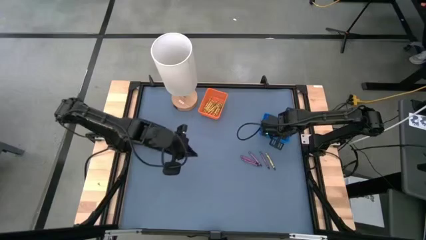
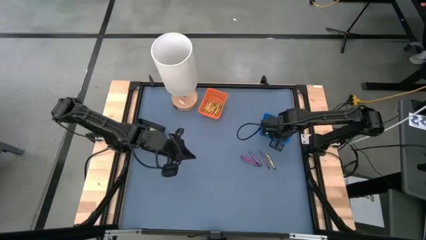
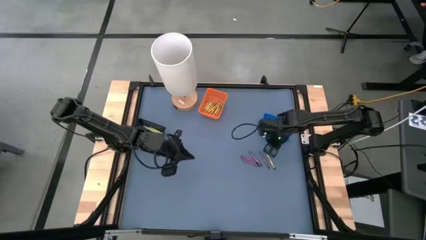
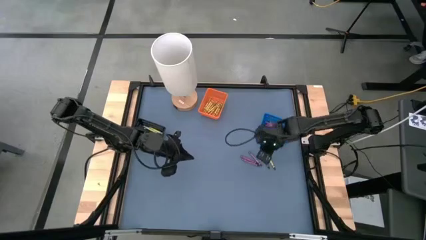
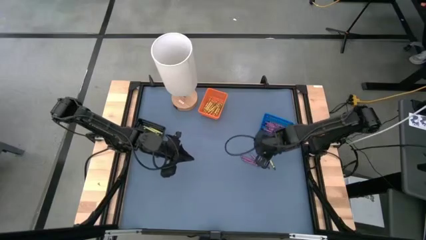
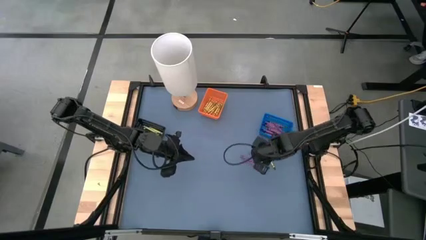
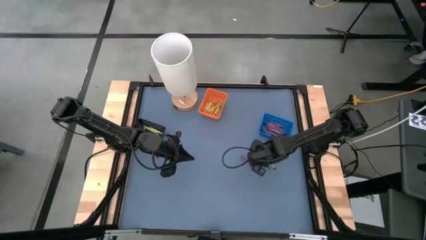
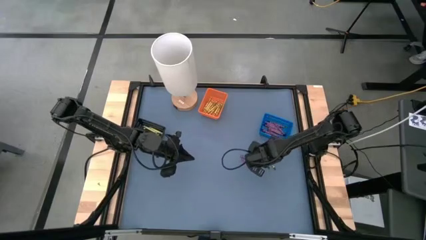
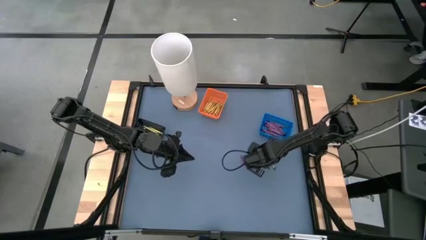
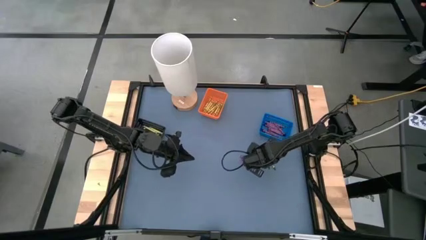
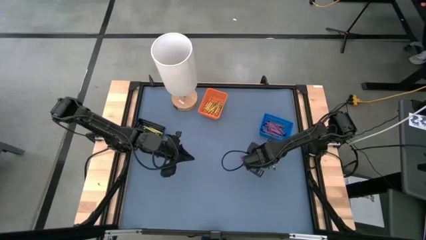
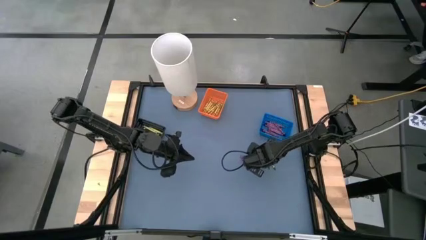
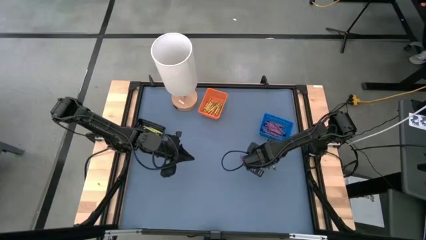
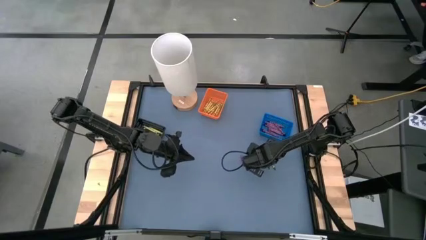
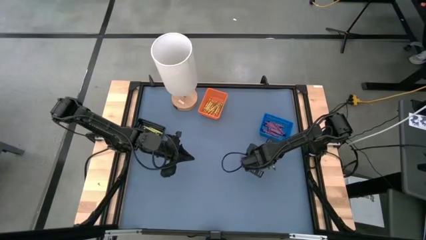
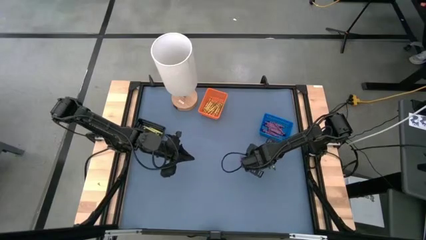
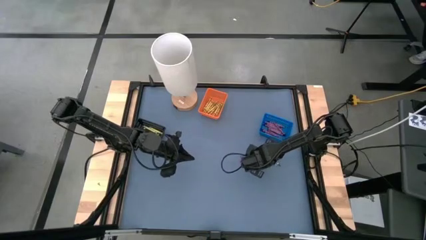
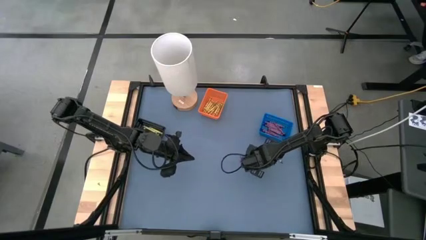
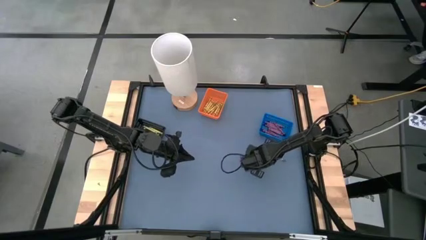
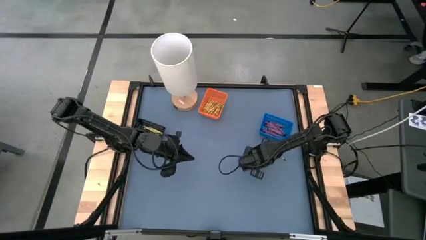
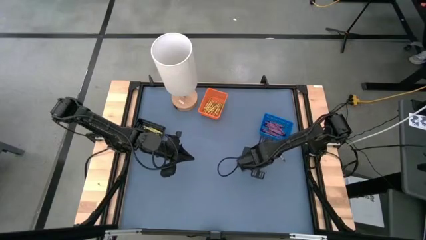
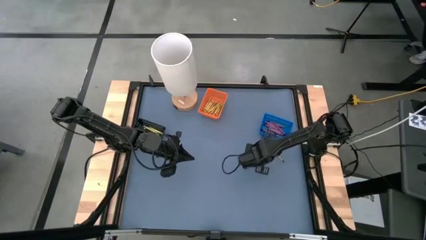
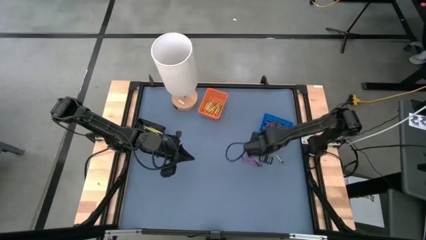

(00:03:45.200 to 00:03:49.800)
Task: Sort crayons
Put the violet crayon into the blue basket

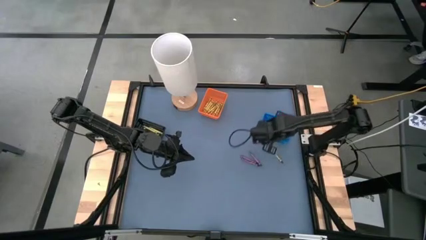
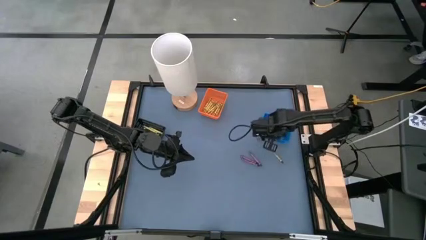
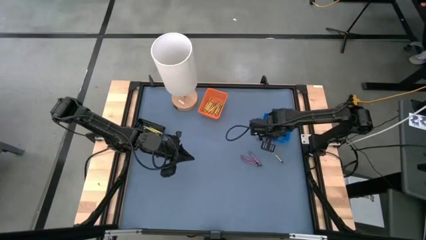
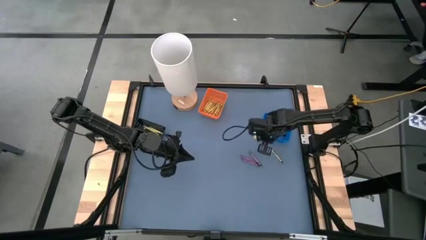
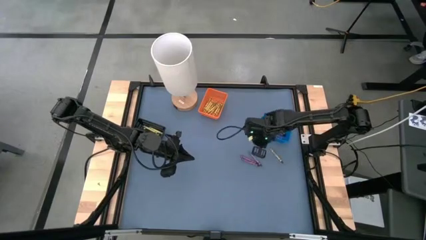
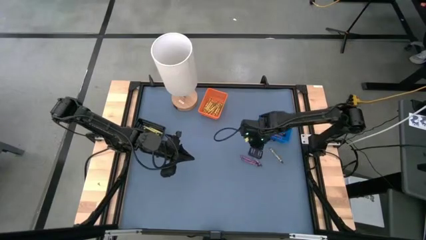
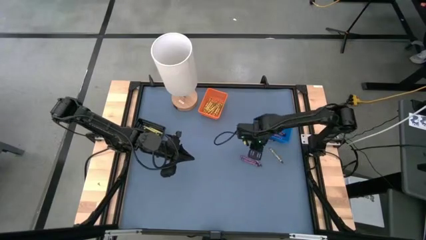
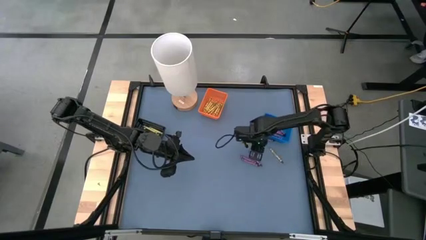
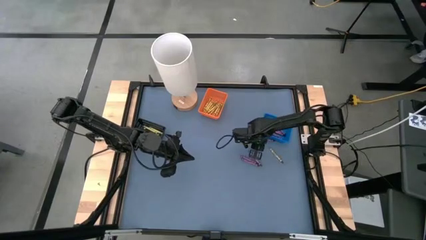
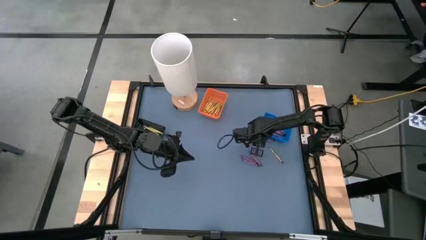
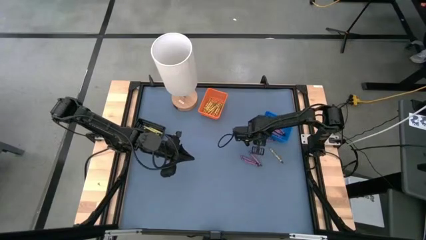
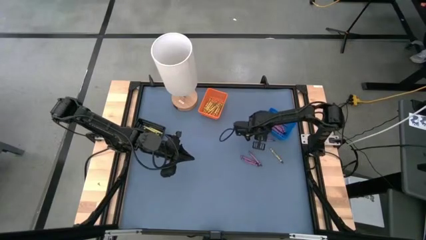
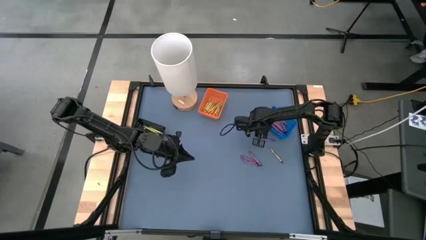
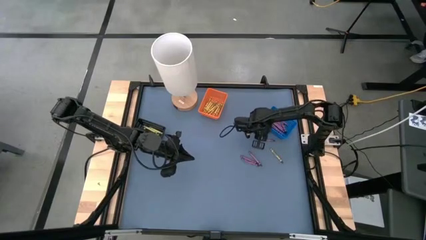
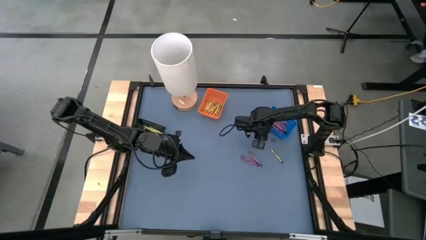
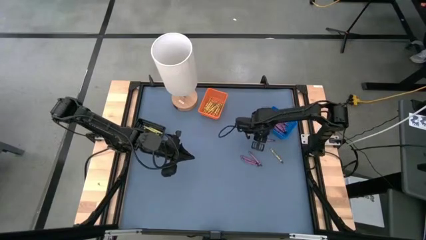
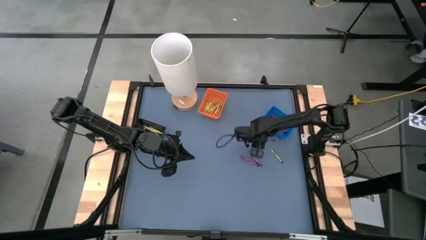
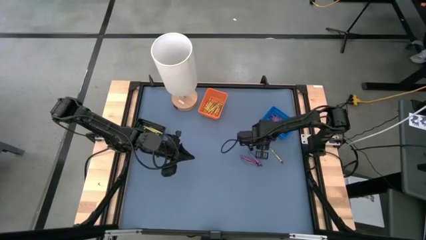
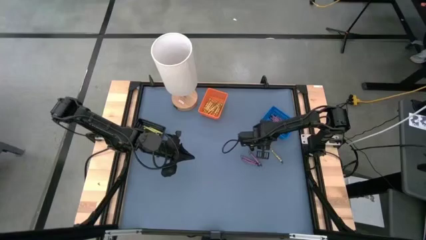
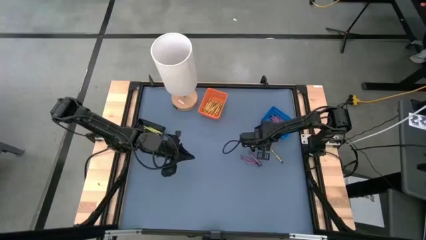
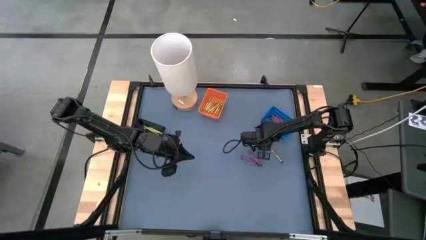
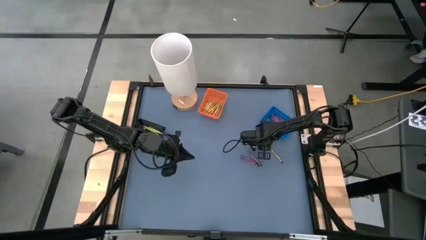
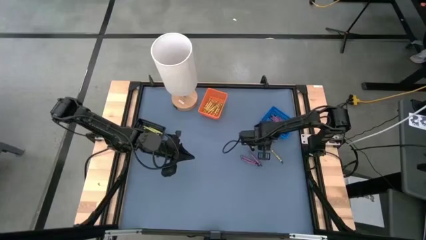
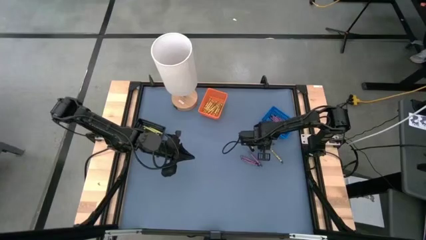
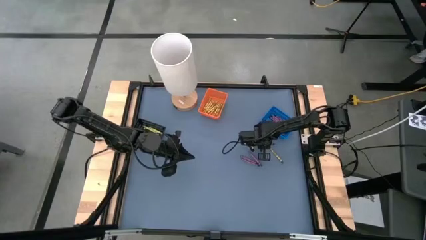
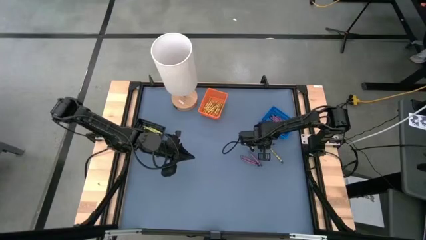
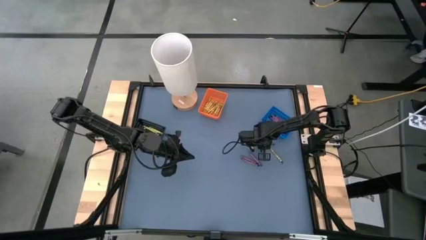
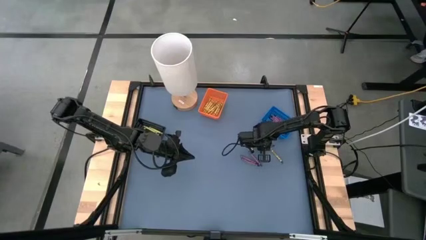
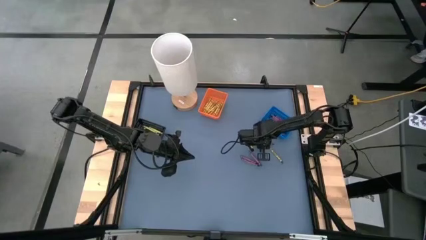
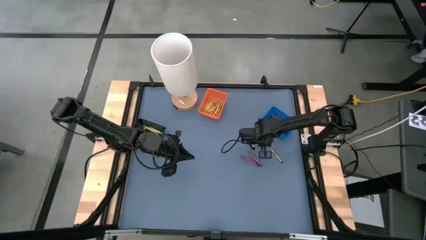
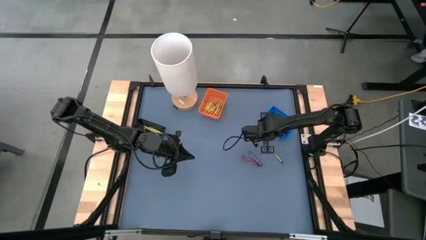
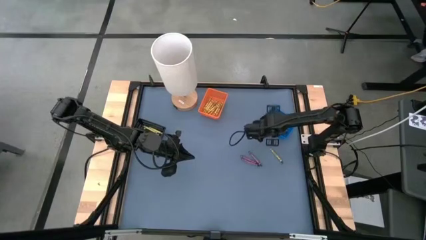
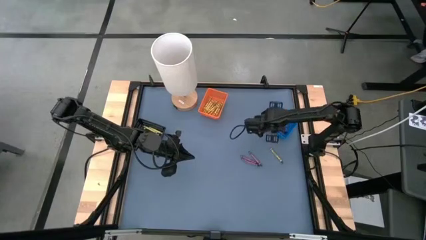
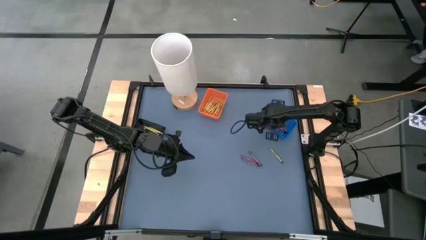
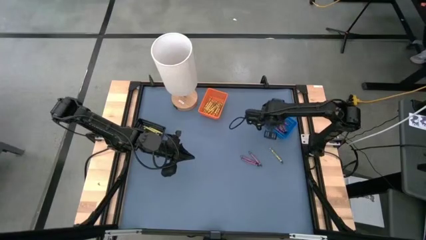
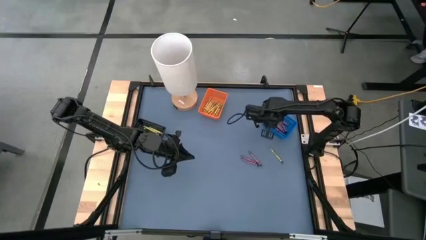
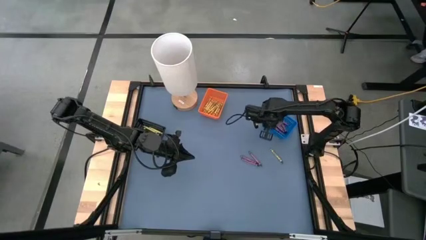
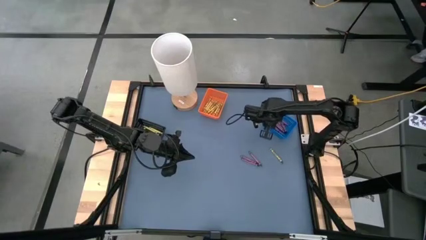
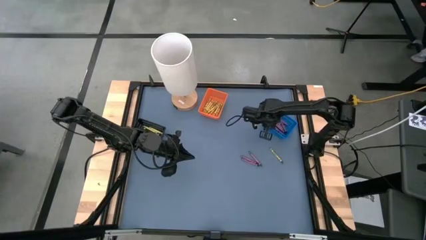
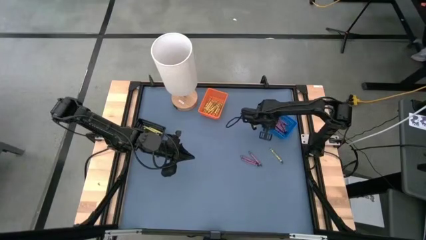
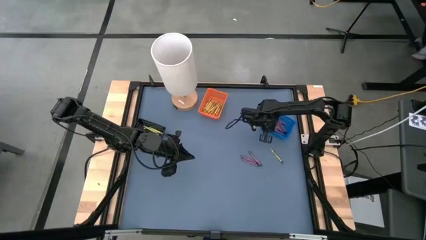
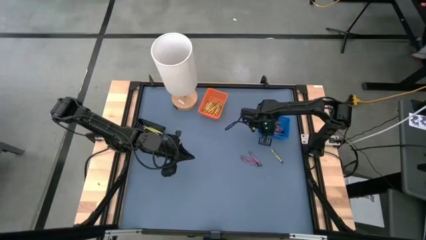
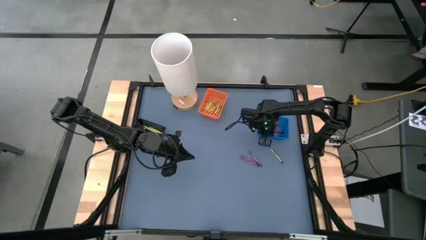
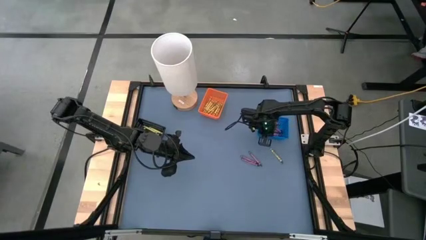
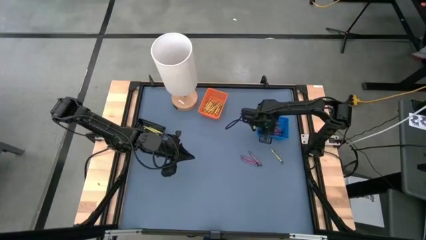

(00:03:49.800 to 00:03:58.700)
Put the violet crayon into the blue basket

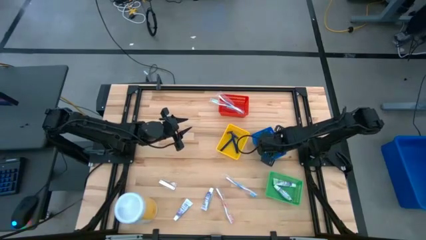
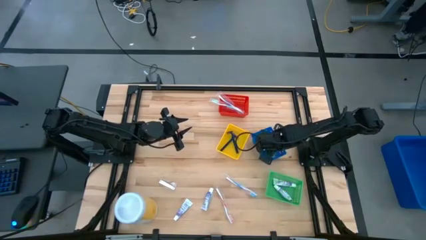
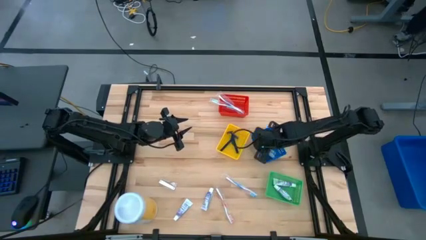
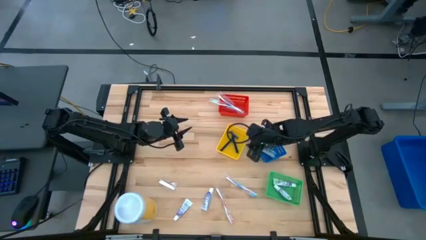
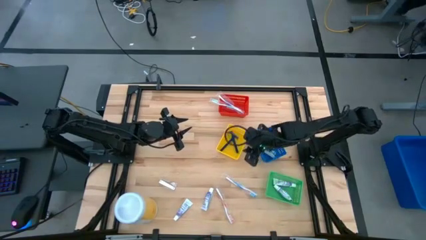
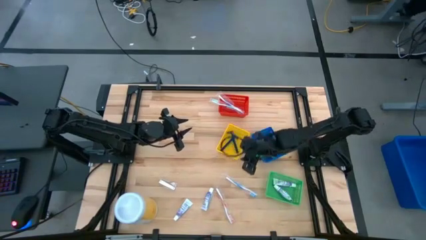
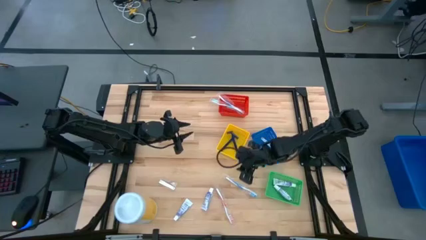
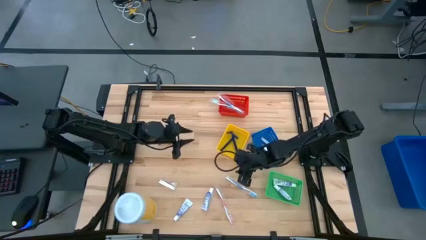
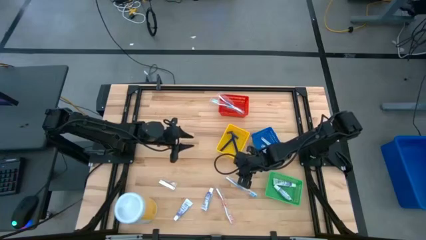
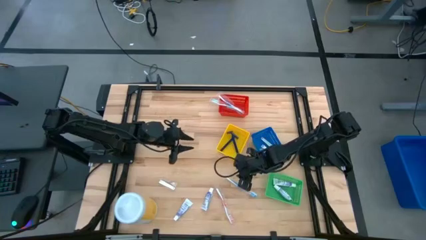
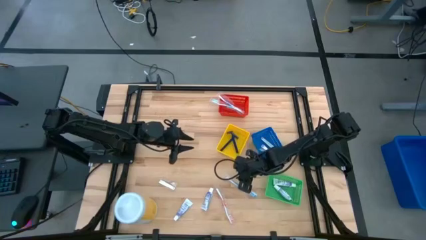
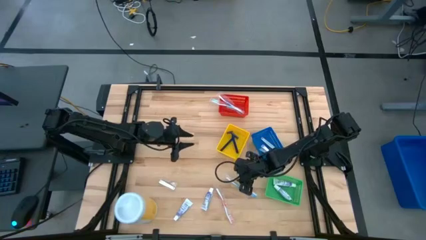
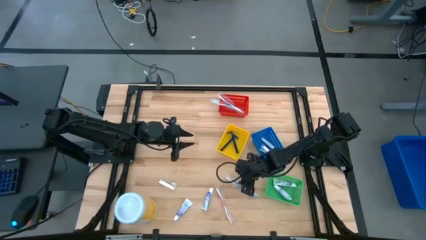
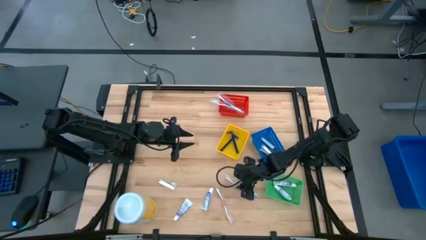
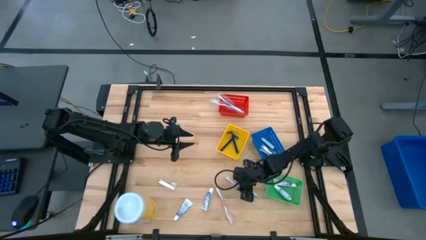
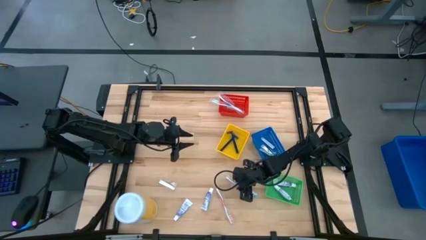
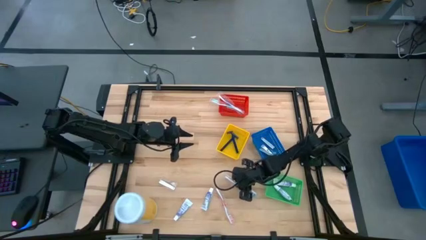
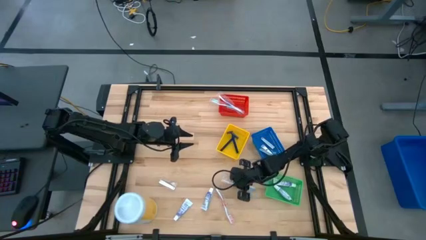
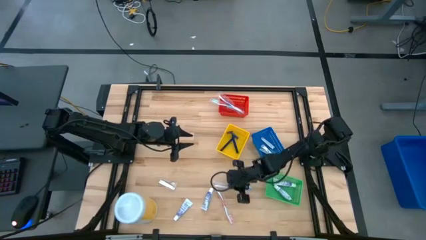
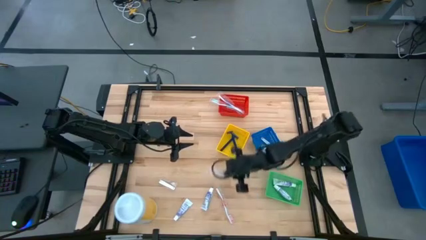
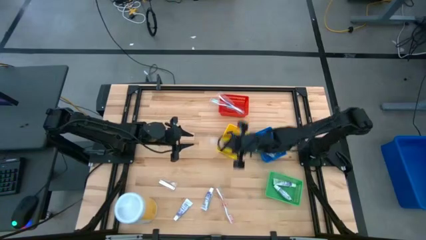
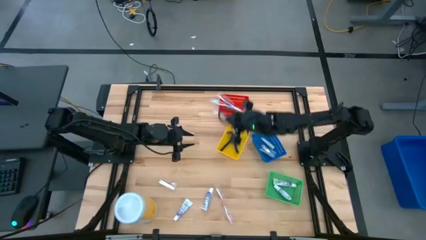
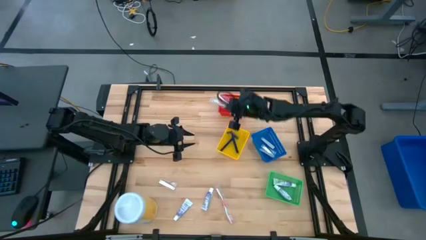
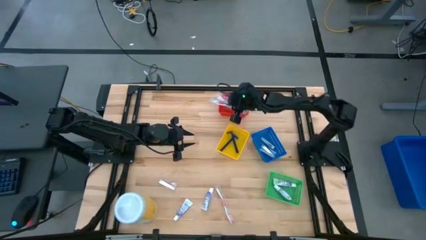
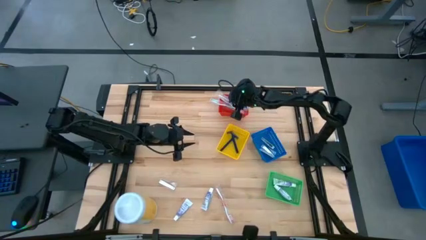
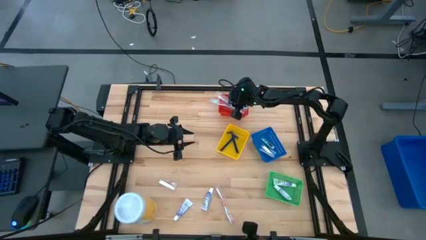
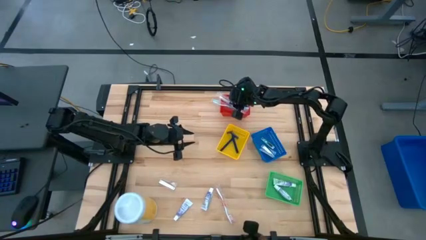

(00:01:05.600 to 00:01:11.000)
Task: Pick & Place Travel size toiletries
Put the blue toothbrush into the red bin
